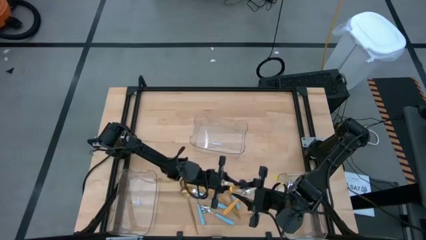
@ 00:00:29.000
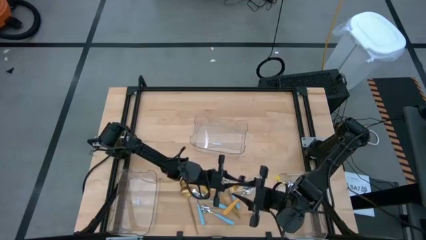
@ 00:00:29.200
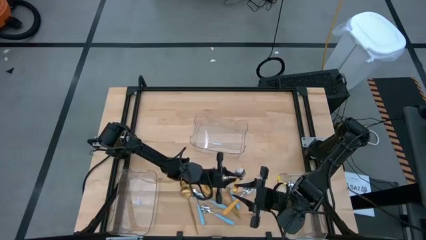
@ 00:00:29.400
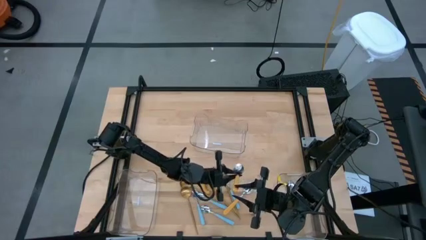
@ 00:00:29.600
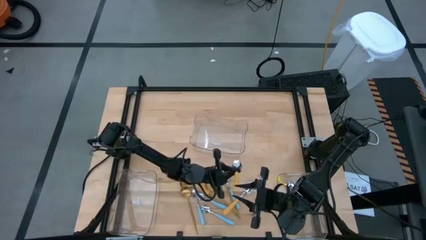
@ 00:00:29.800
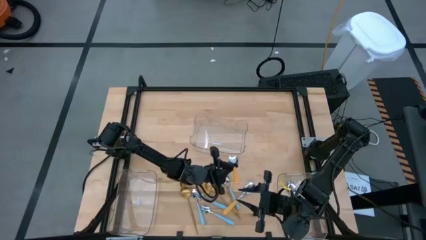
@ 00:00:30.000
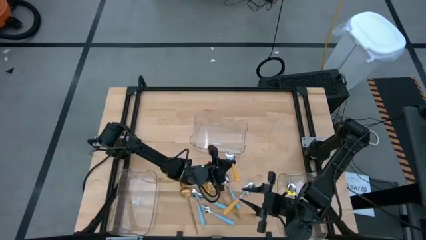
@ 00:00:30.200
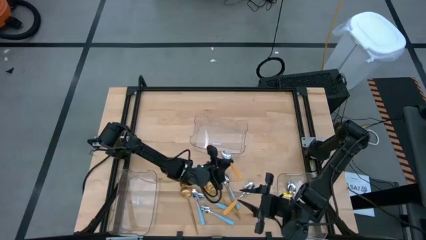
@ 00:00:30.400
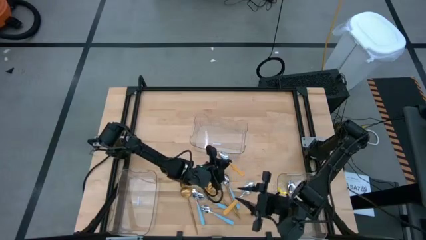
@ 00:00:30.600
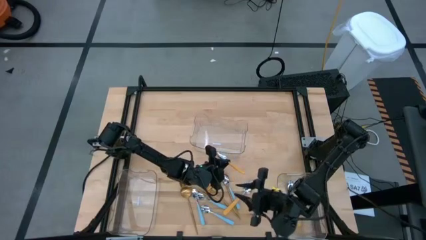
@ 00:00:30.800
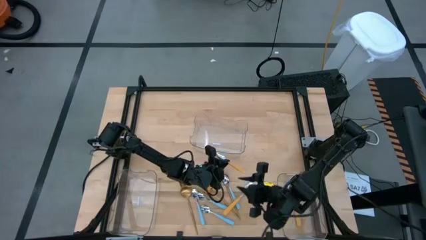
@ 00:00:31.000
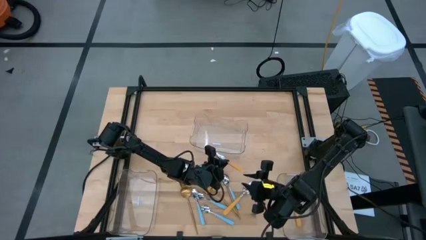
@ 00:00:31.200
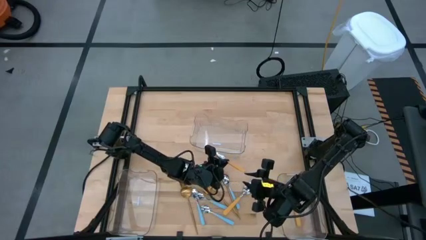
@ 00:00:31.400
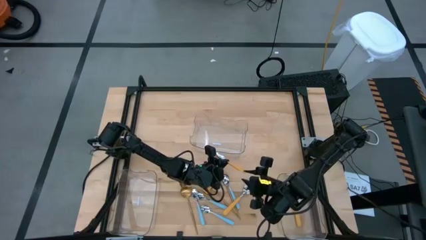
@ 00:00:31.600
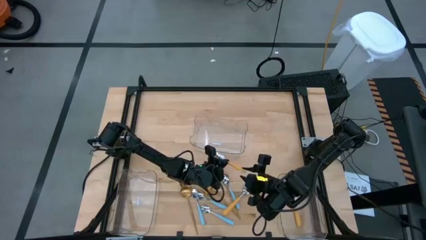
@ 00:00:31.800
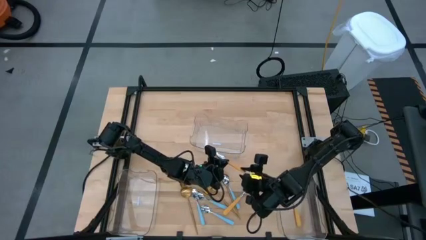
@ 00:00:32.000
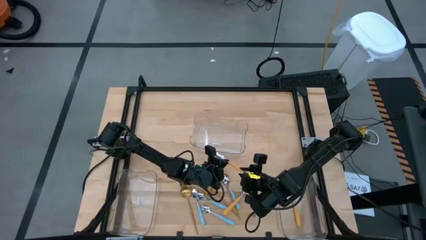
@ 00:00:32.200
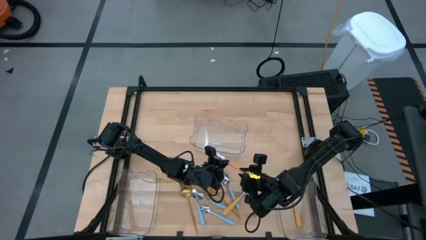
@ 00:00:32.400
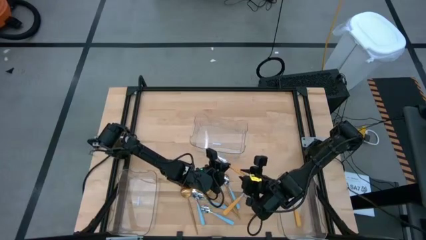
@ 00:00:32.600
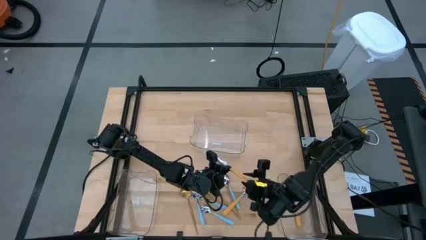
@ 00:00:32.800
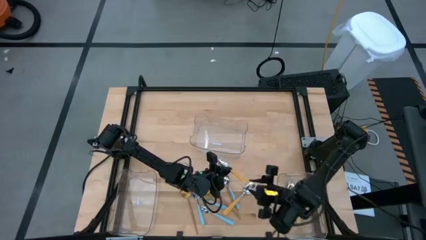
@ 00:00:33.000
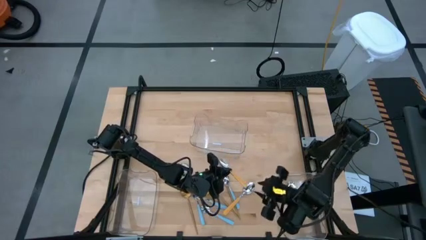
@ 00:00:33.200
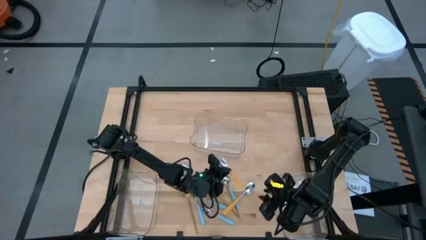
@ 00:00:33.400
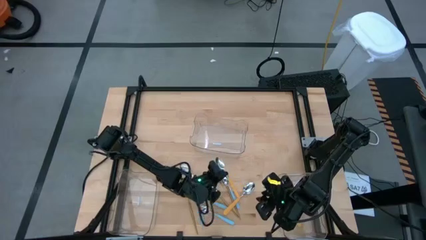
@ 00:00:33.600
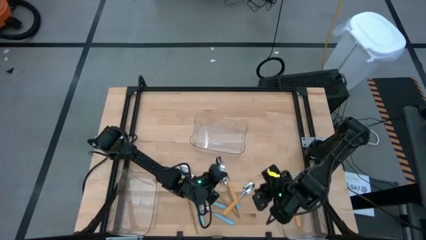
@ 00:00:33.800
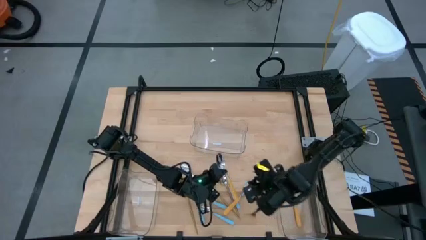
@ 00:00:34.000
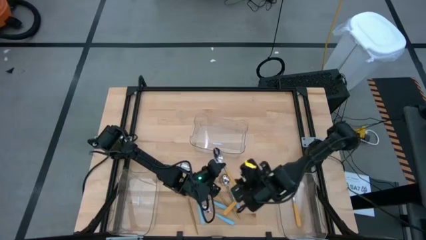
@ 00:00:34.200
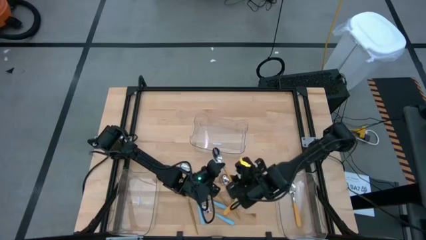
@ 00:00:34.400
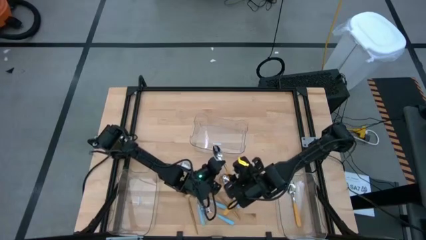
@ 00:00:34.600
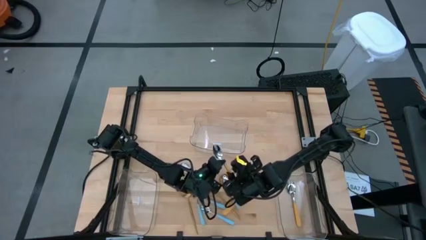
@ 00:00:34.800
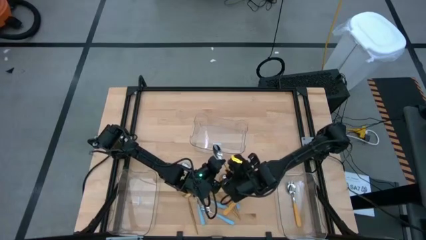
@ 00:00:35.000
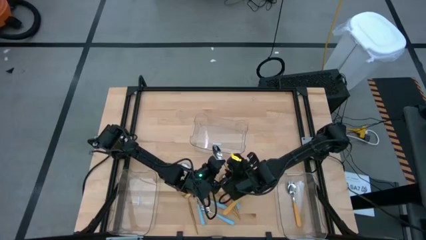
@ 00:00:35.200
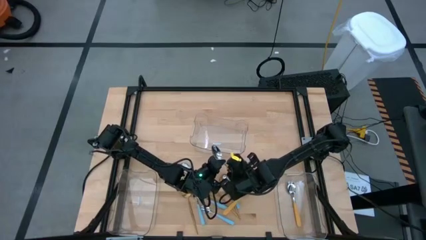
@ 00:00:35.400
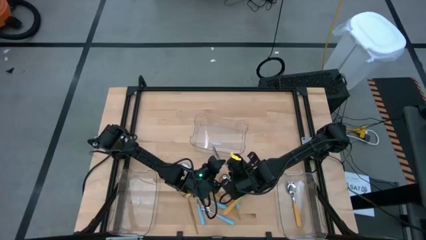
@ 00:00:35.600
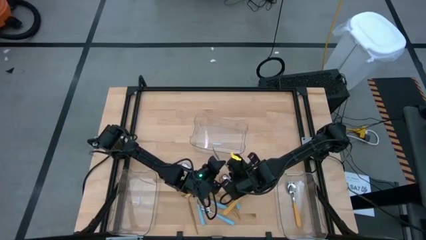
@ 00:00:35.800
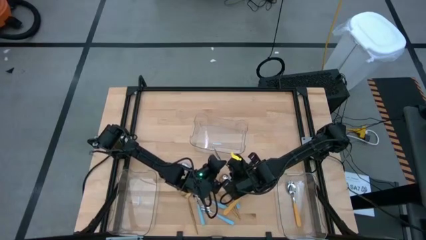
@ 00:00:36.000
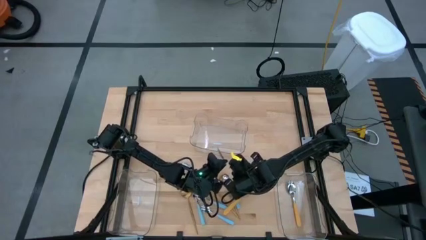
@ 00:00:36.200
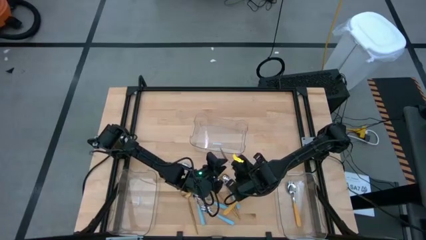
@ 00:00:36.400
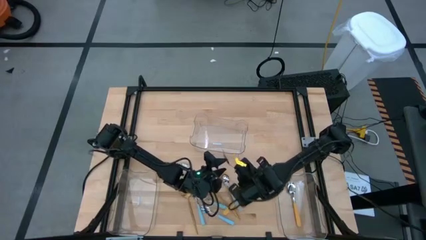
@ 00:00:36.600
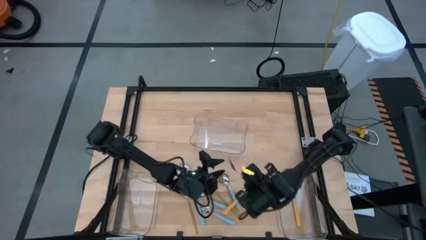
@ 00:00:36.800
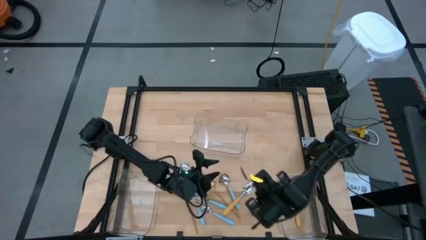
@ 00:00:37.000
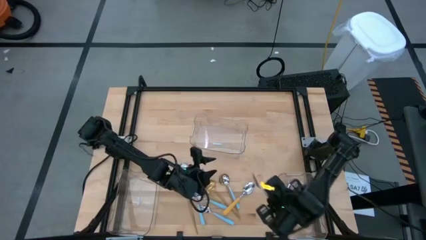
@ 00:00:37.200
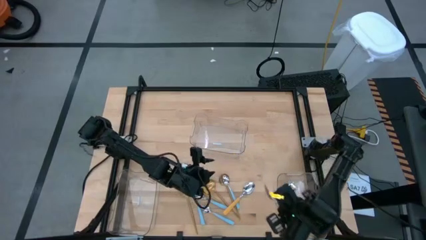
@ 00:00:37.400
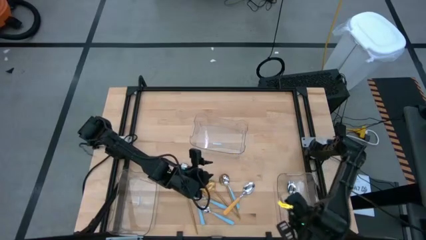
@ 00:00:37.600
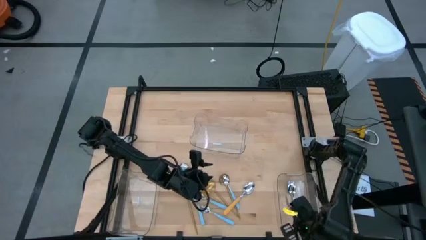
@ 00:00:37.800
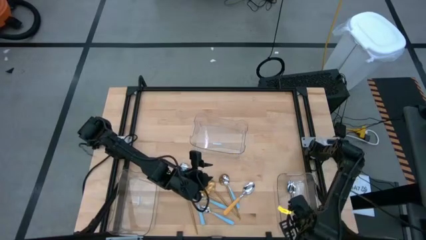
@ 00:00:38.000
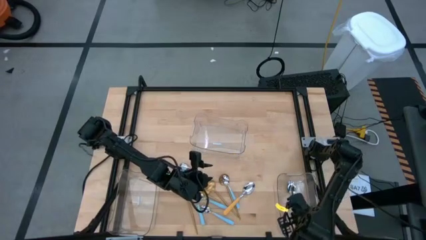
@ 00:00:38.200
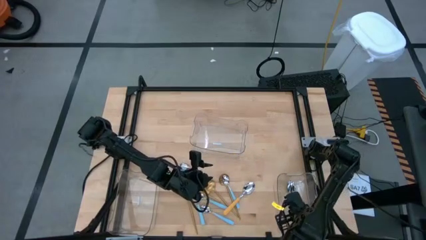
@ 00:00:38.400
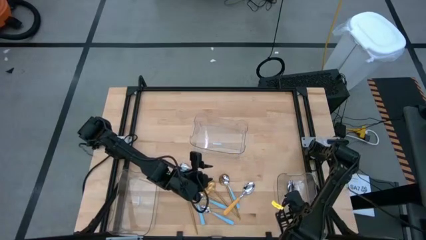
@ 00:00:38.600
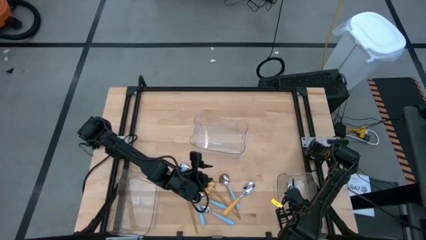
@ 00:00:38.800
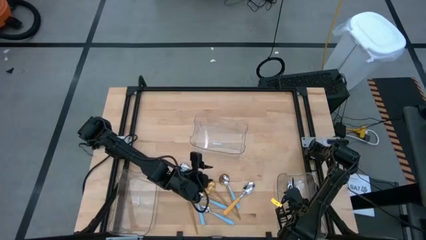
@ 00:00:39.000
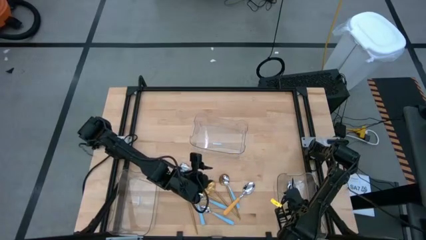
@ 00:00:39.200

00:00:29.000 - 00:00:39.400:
Task: Sort silverware by color (type)
Put the yellow spoon into the bottom right transparent bin
